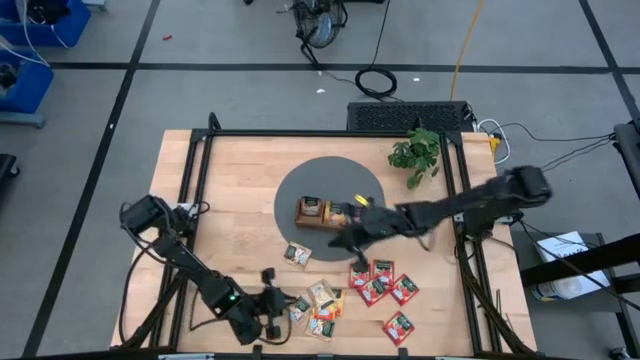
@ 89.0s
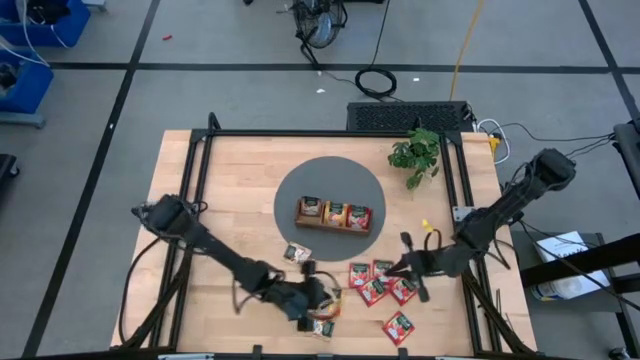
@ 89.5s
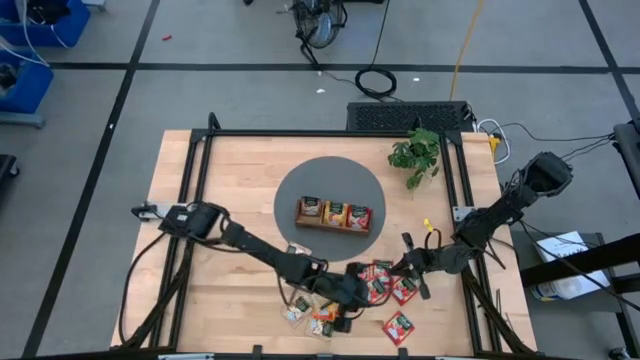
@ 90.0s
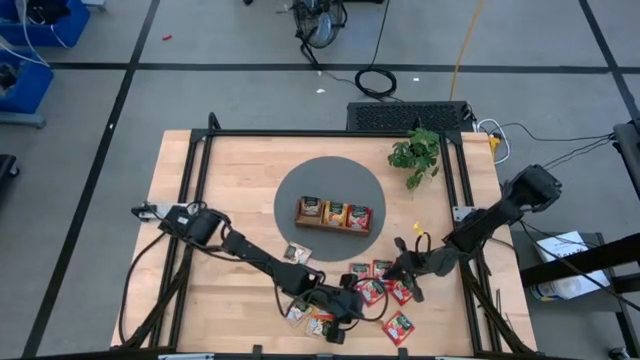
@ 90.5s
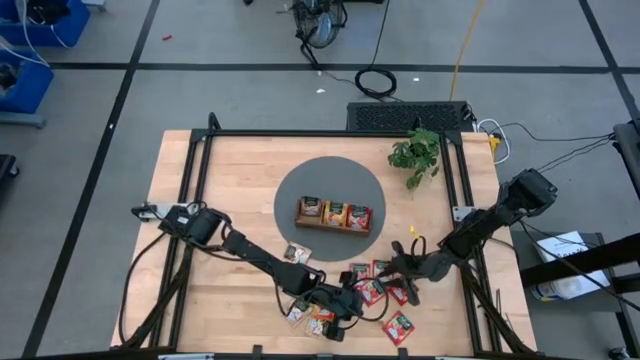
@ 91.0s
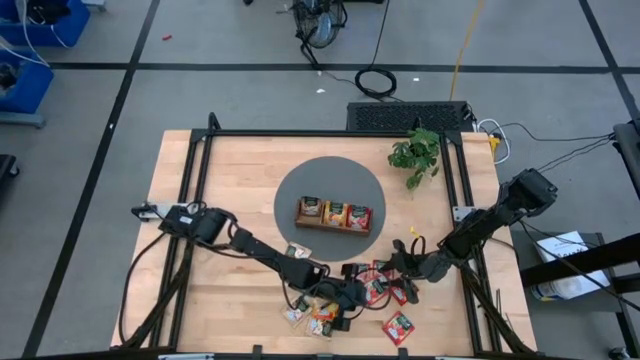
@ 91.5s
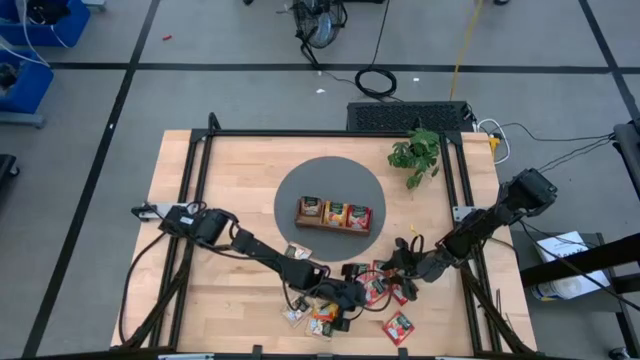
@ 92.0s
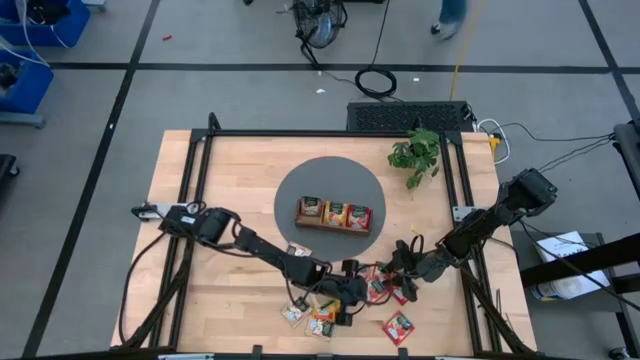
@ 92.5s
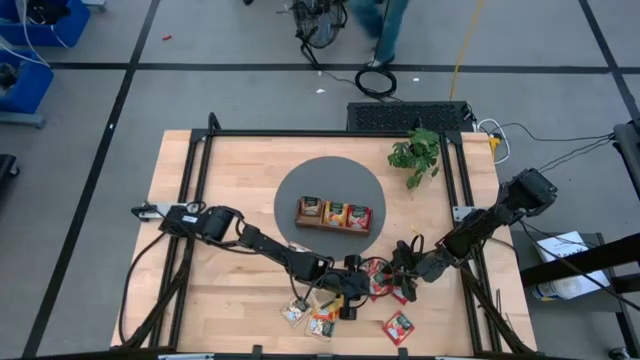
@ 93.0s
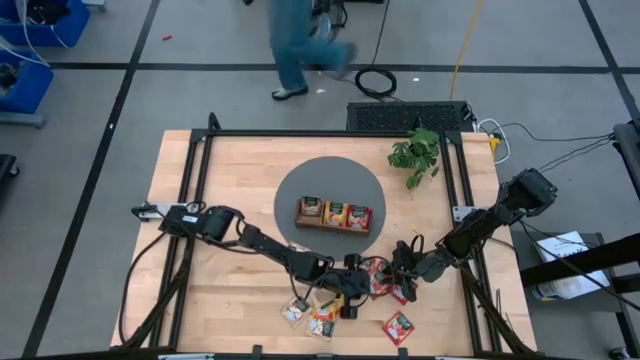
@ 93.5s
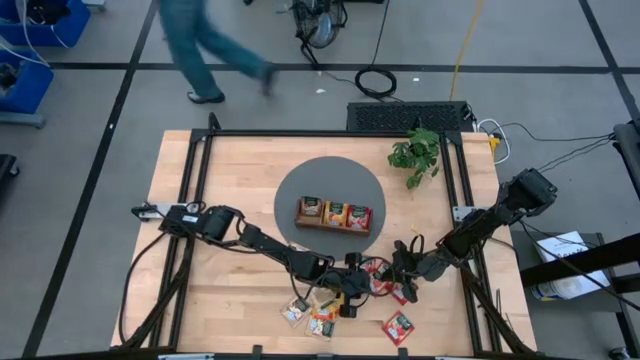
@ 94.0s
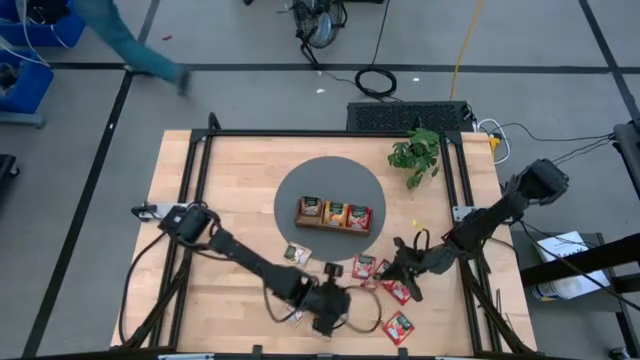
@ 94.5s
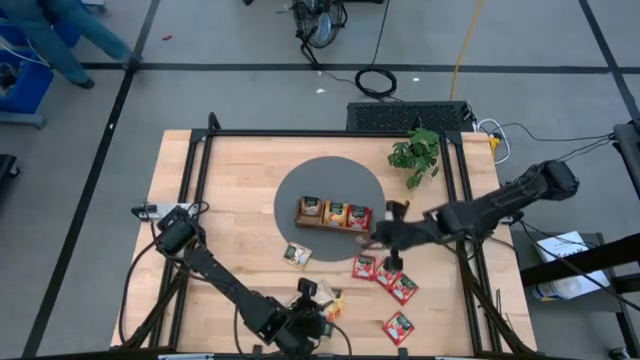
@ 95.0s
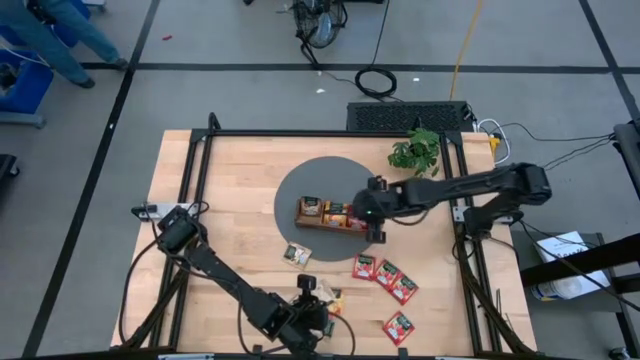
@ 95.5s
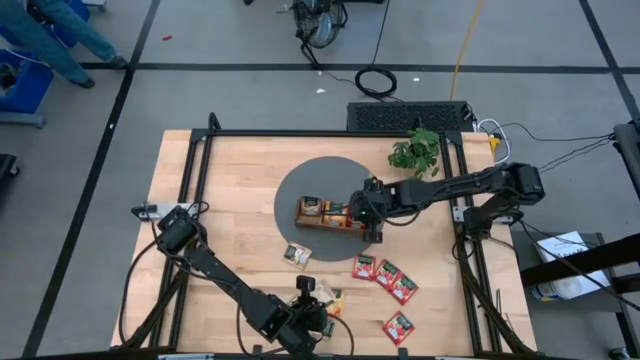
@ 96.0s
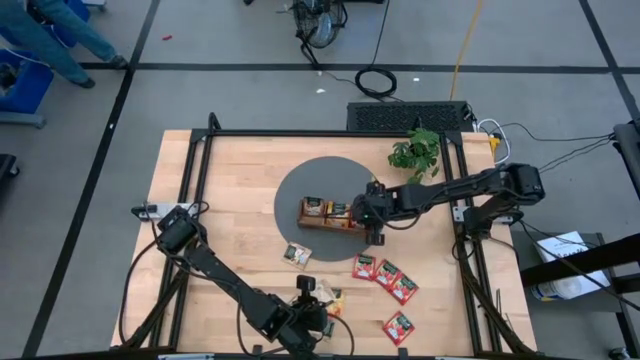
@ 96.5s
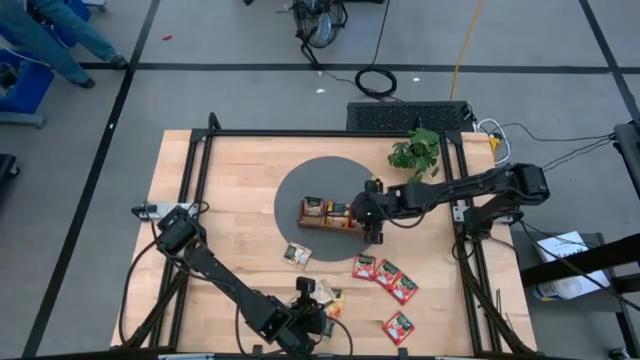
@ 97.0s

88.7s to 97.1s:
Task: Pick & Place Tea
Put the red tea bag into the right section of the wooden organizer

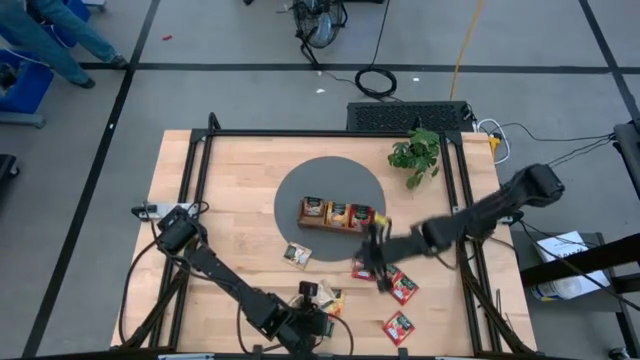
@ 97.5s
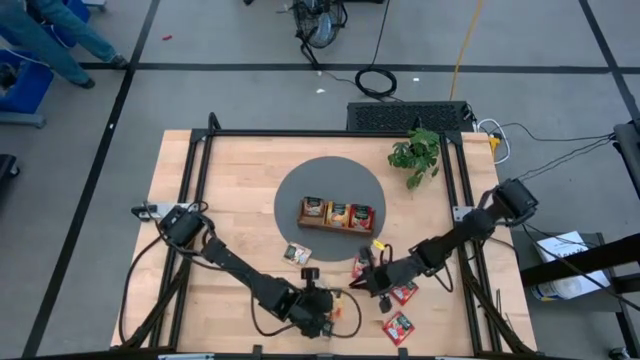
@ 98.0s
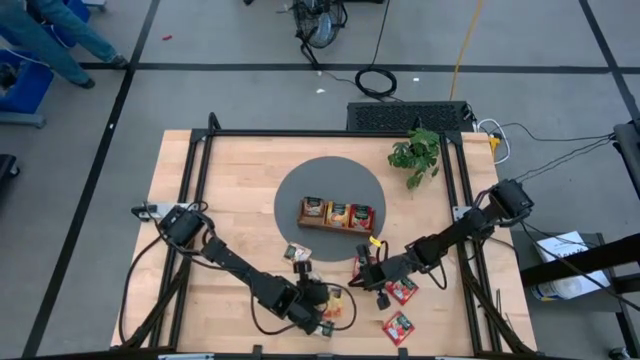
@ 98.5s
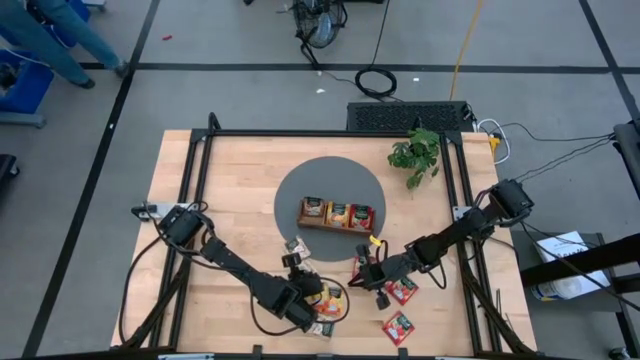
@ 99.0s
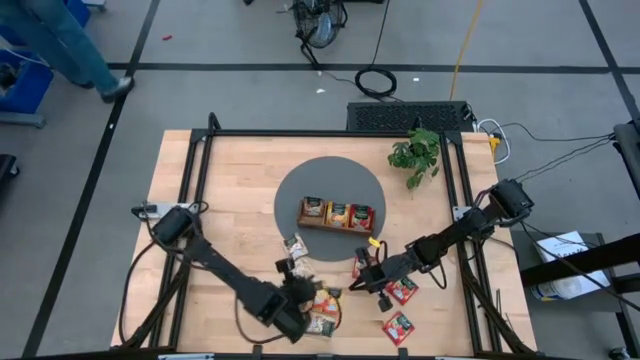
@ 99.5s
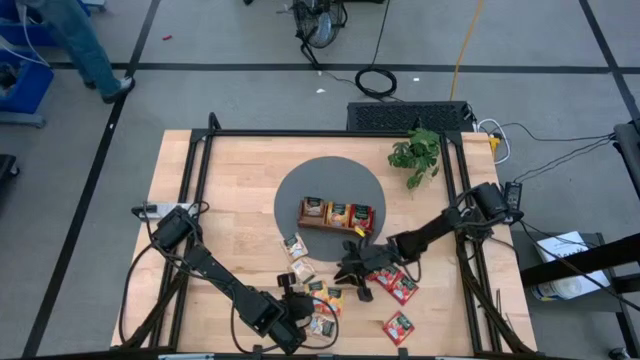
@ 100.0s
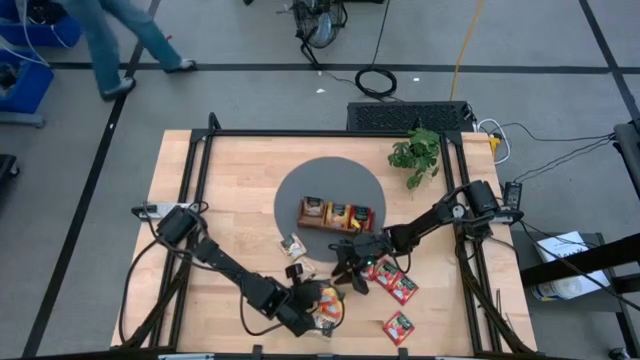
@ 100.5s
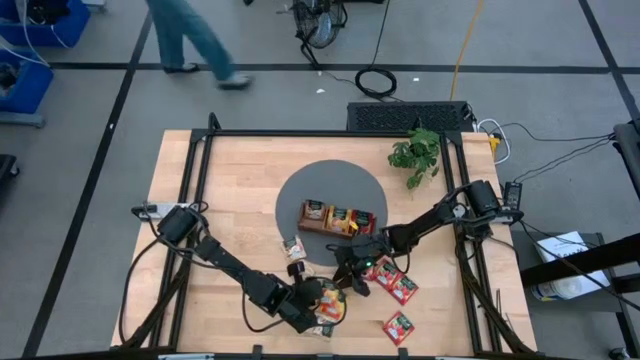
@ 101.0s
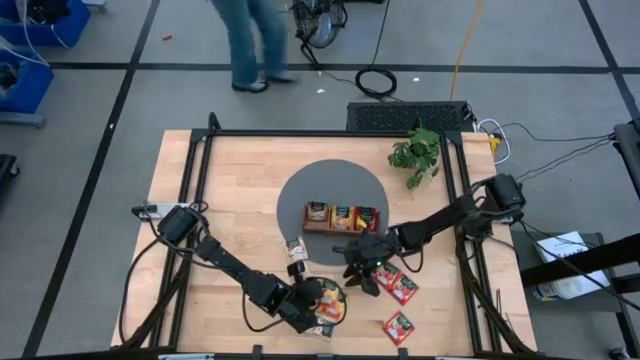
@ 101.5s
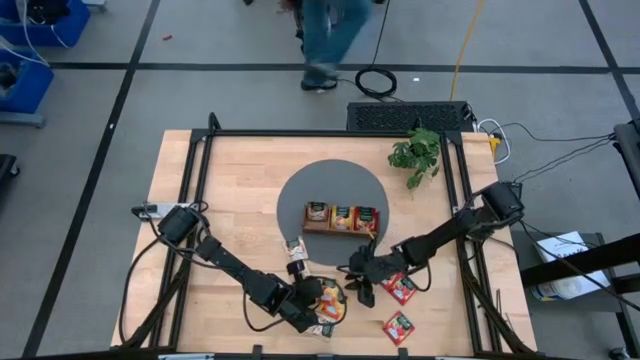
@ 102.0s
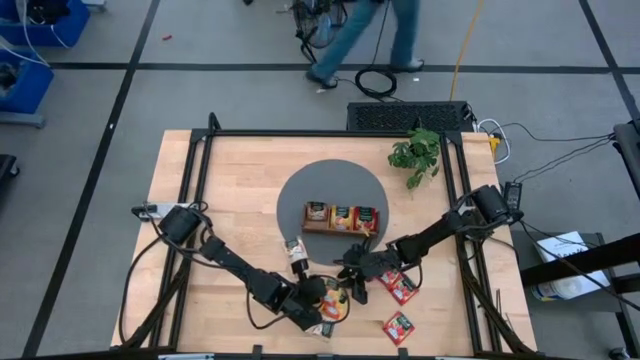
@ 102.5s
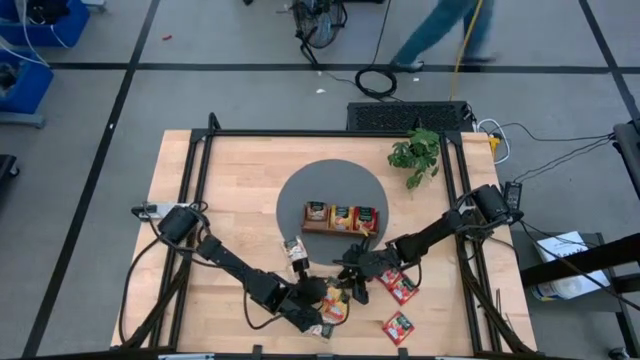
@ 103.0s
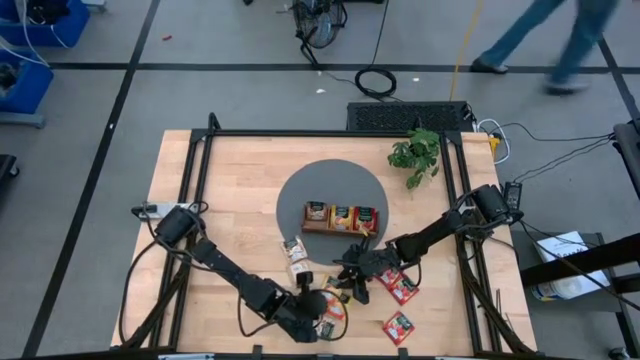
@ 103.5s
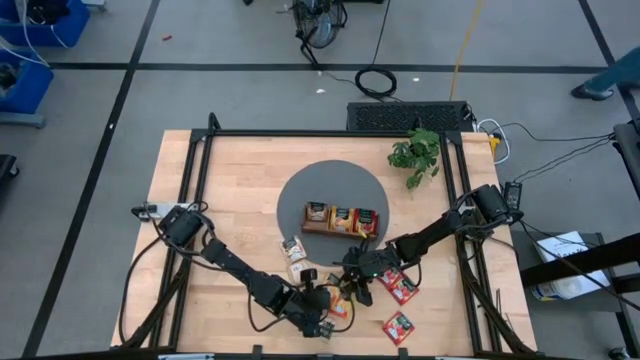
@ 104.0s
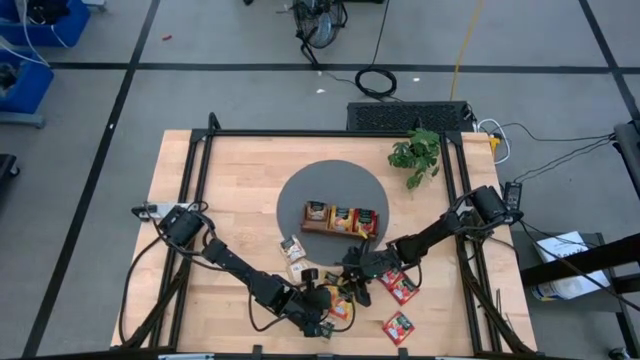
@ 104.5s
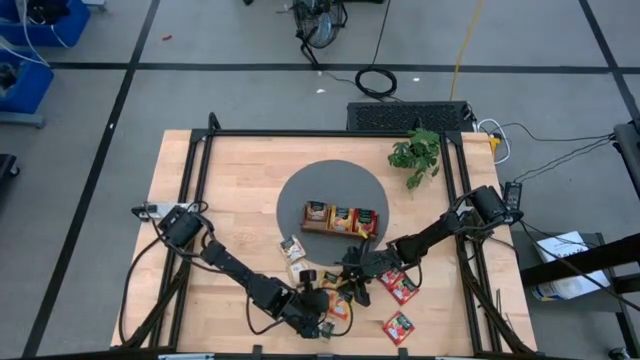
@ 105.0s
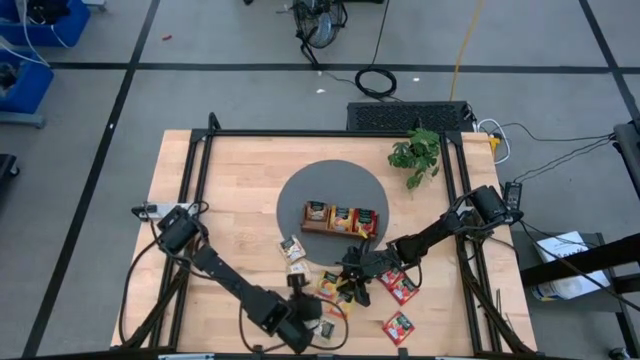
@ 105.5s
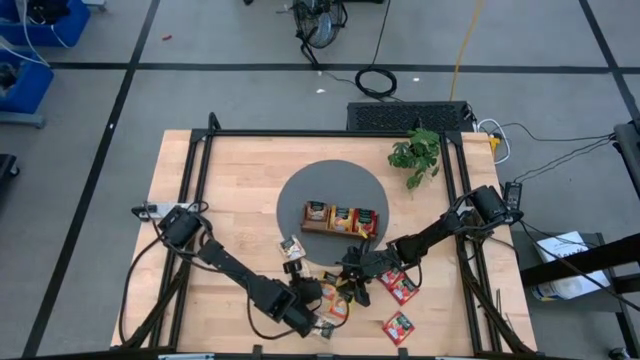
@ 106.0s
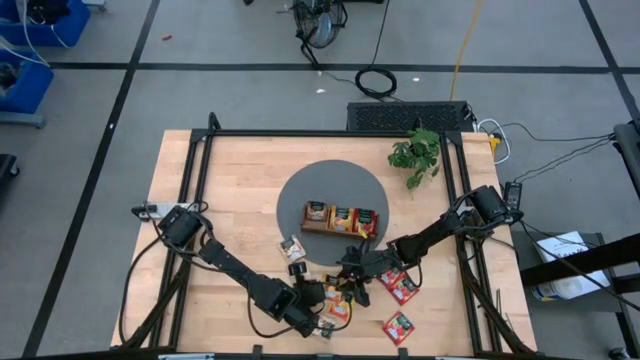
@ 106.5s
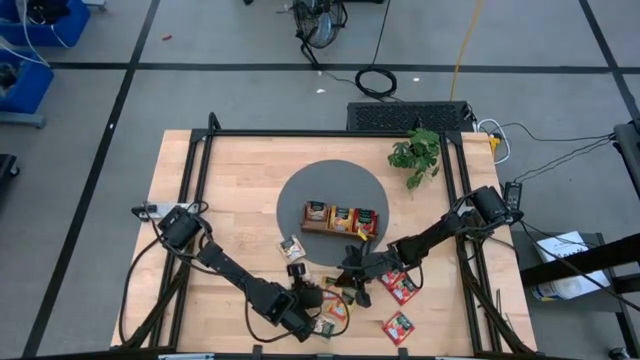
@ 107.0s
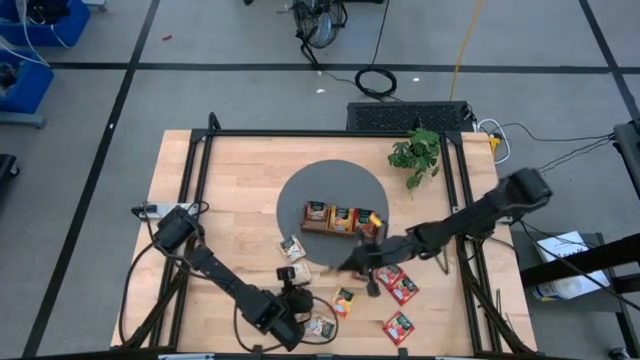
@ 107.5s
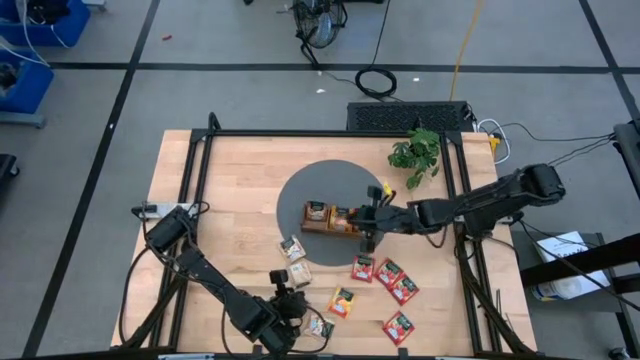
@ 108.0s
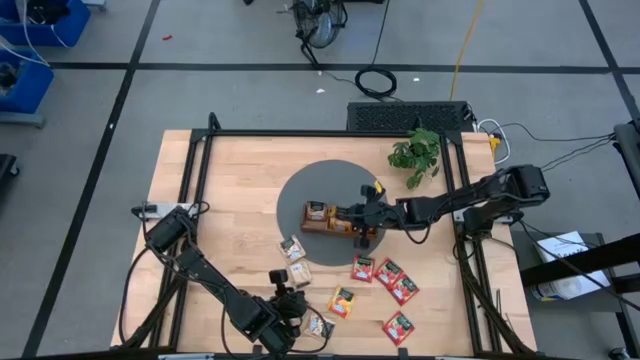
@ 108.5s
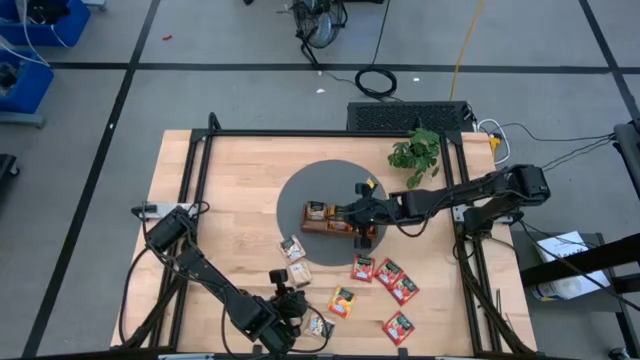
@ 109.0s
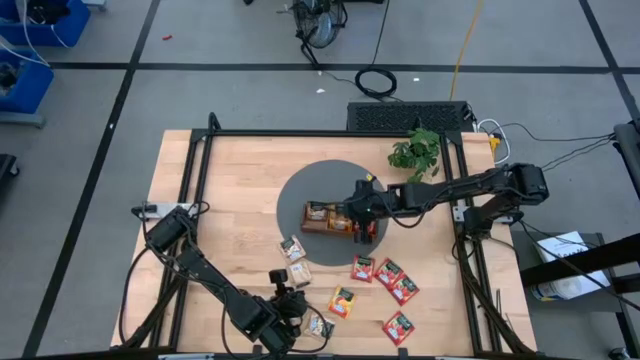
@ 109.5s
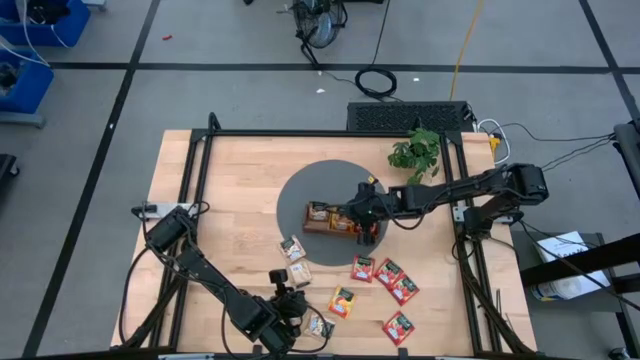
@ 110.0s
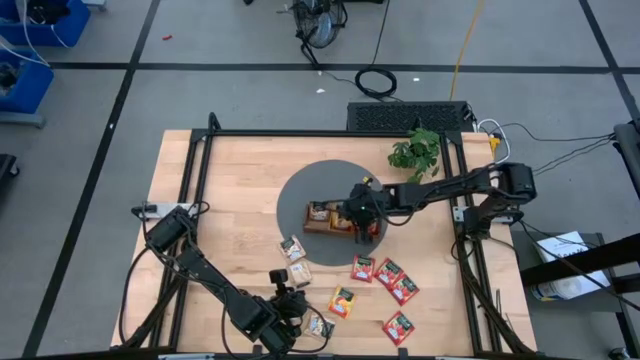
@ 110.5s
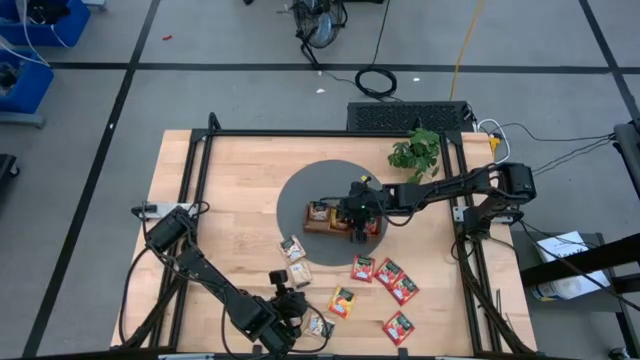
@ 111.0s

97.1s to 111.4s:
Put the yellow tea bag into the middle section of the wooden organizer
